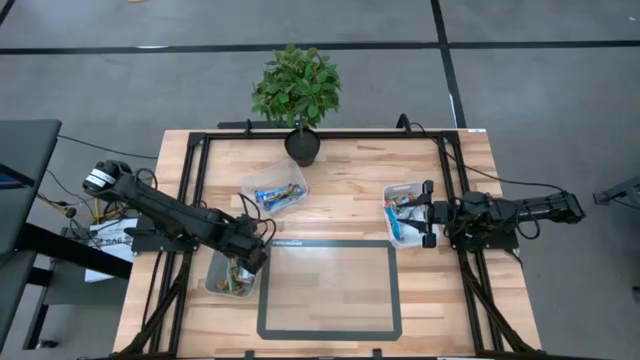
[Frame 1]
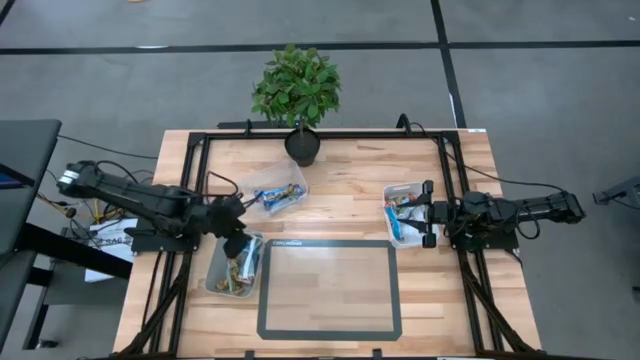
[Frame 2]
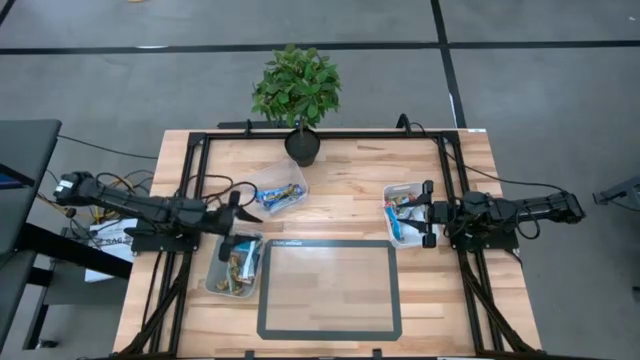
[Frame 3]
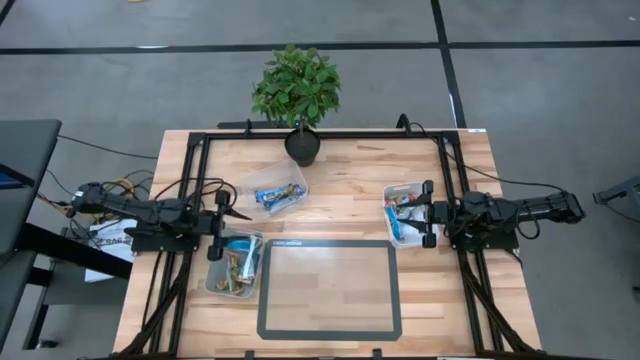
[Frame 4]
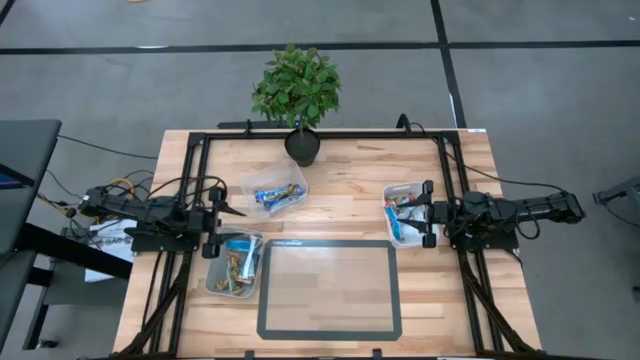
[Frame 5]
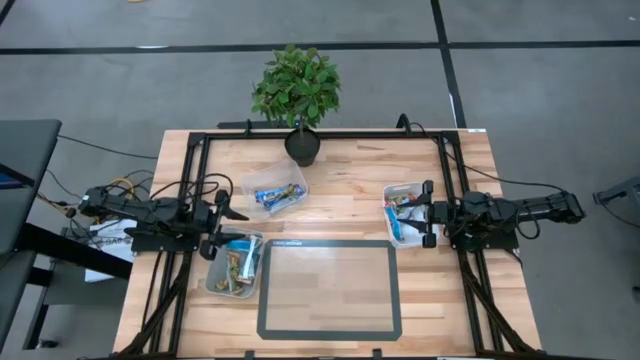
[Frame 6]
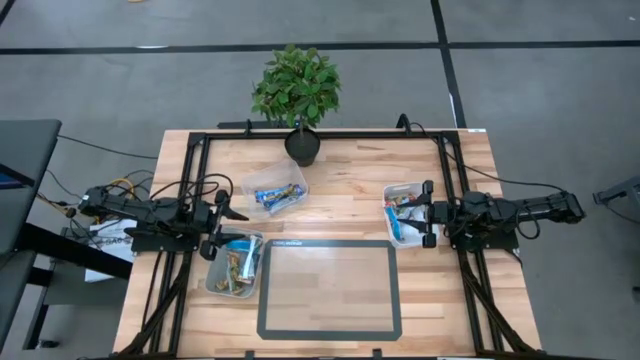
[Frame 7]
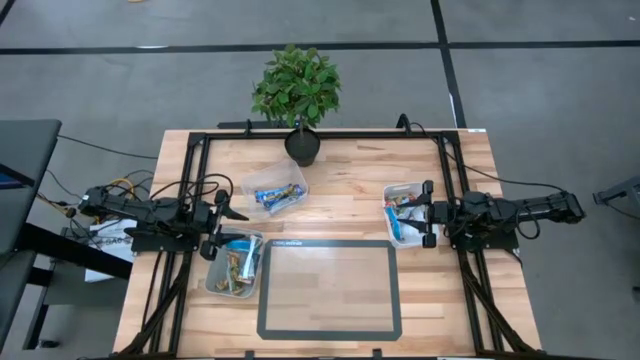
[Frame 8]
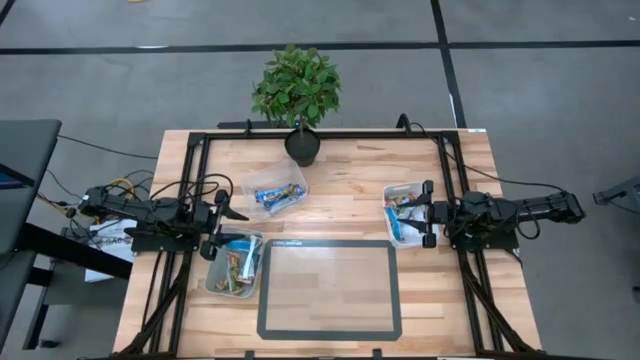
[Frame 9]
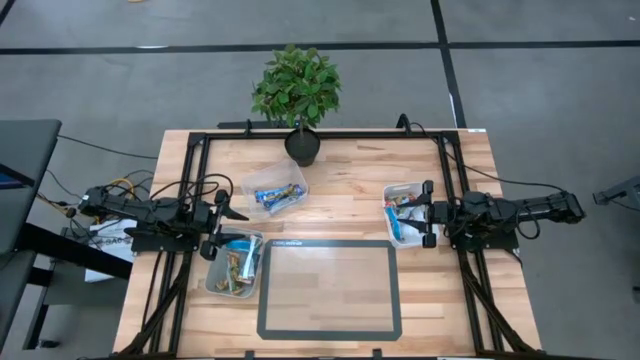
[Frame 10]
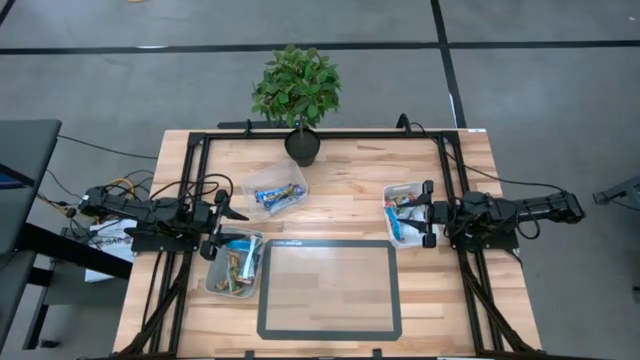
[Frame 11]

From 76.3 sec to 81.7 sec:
Task: Pick and place Granola Bars by type
Return to Home Position

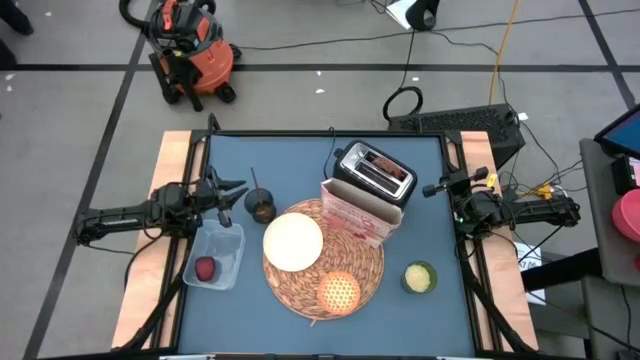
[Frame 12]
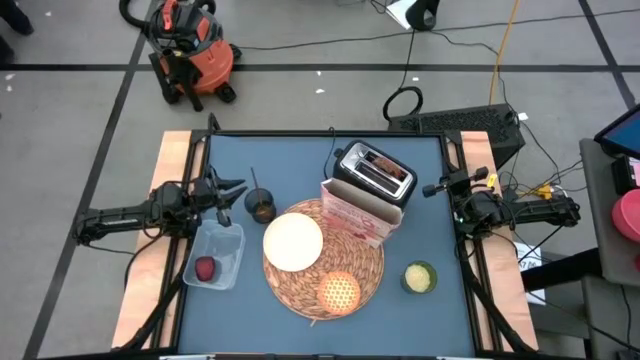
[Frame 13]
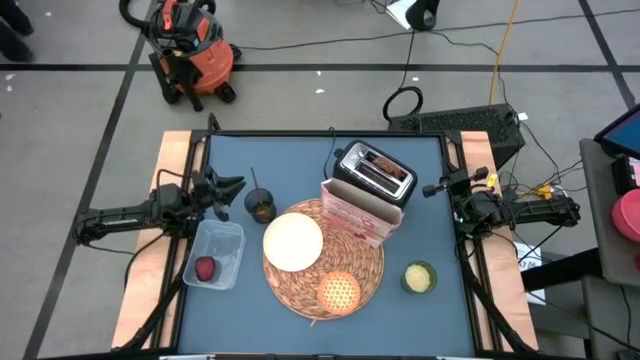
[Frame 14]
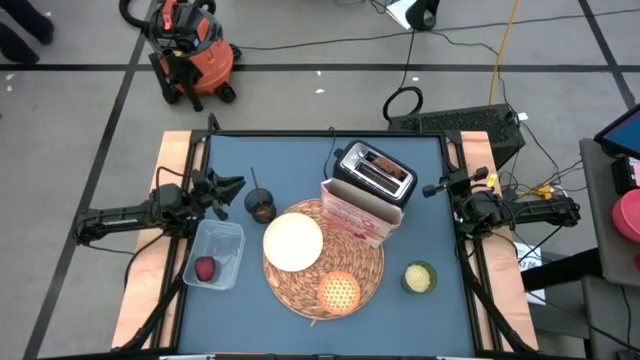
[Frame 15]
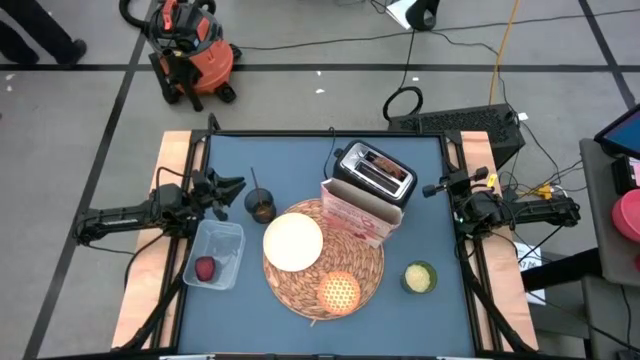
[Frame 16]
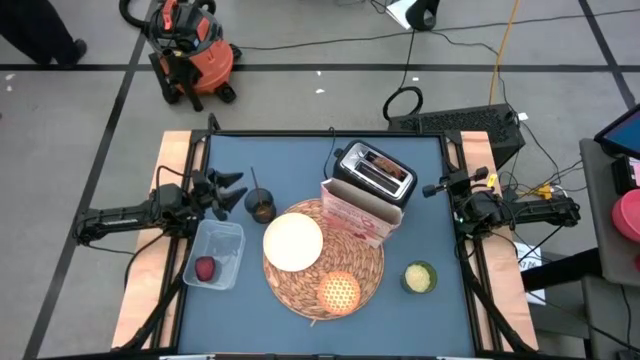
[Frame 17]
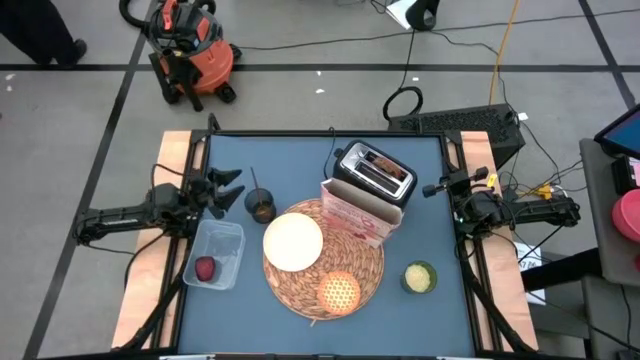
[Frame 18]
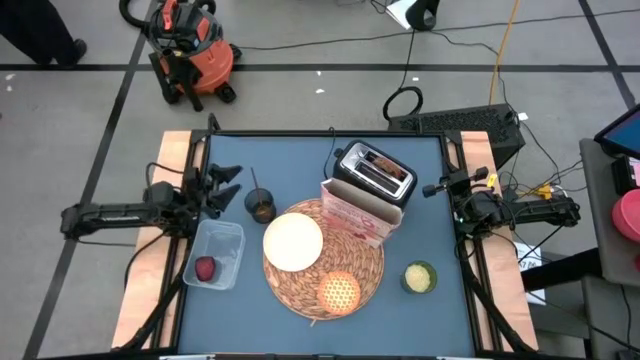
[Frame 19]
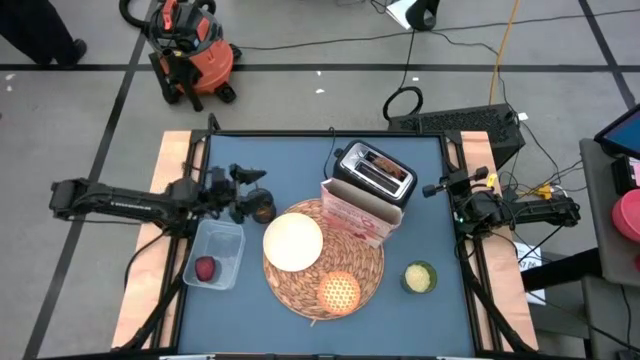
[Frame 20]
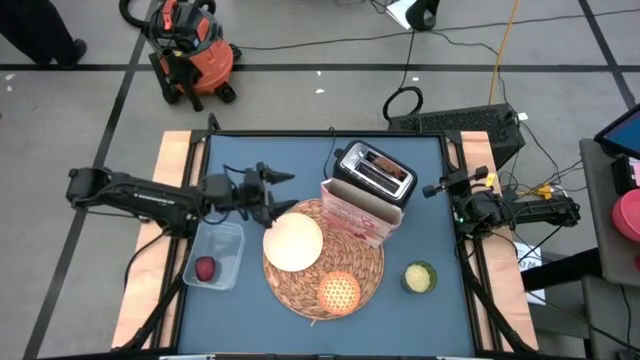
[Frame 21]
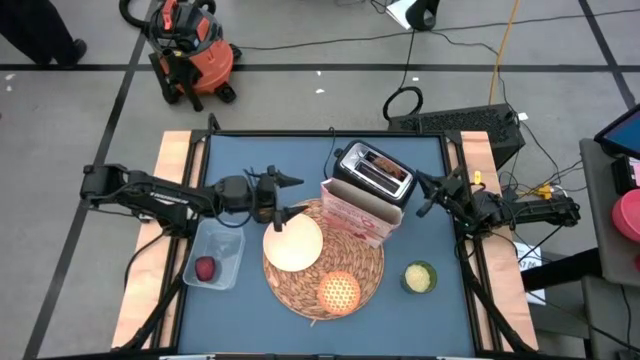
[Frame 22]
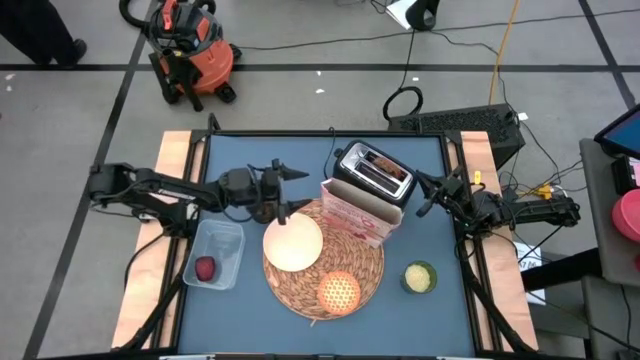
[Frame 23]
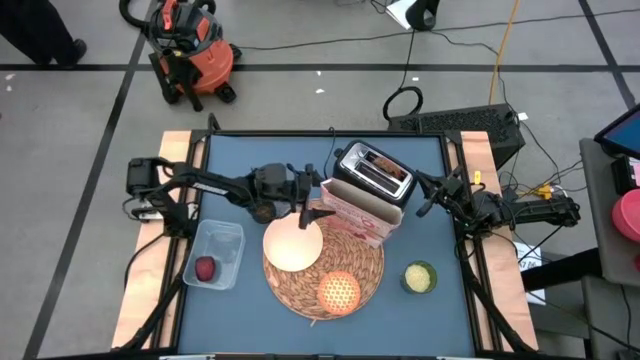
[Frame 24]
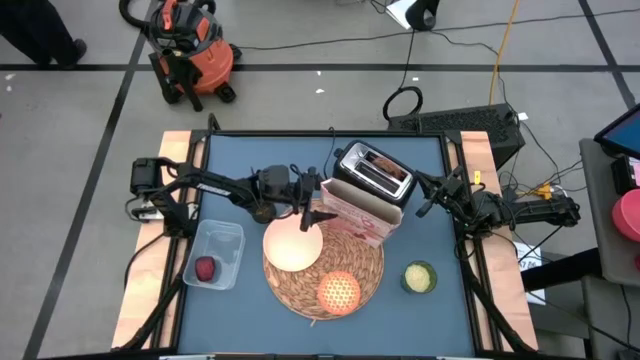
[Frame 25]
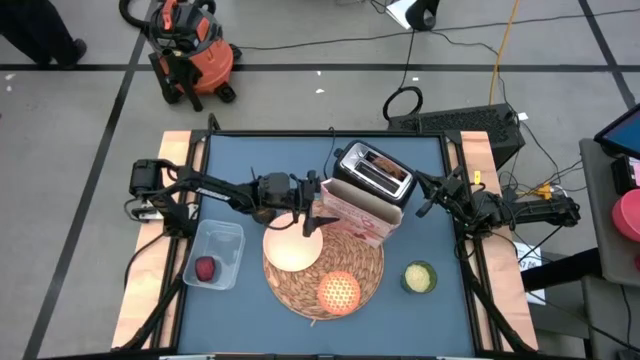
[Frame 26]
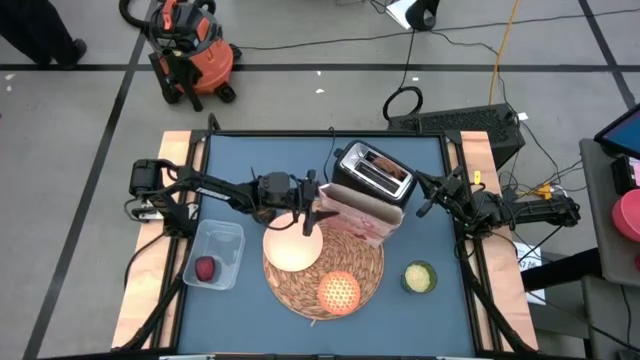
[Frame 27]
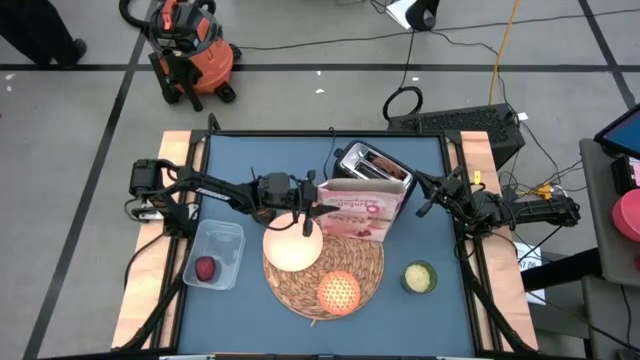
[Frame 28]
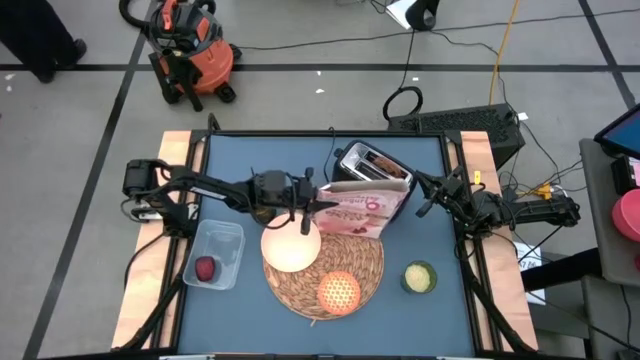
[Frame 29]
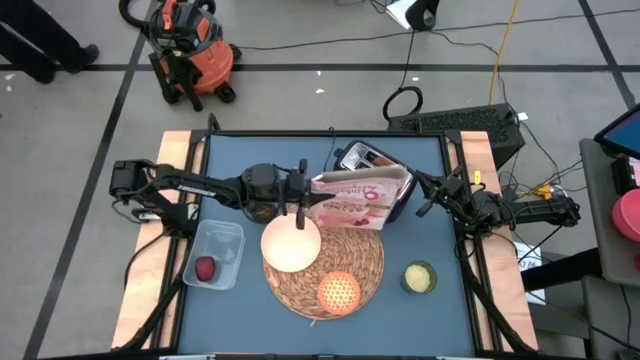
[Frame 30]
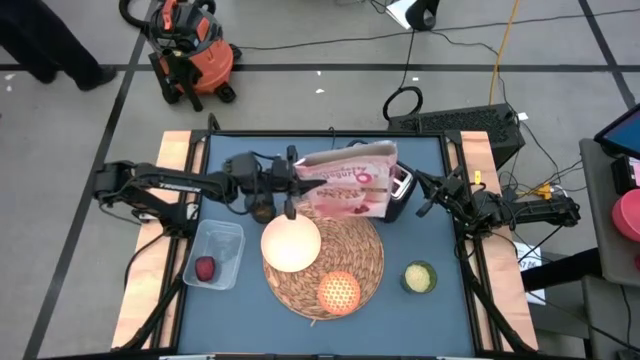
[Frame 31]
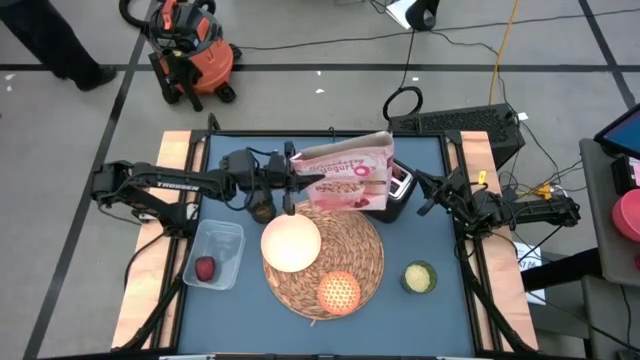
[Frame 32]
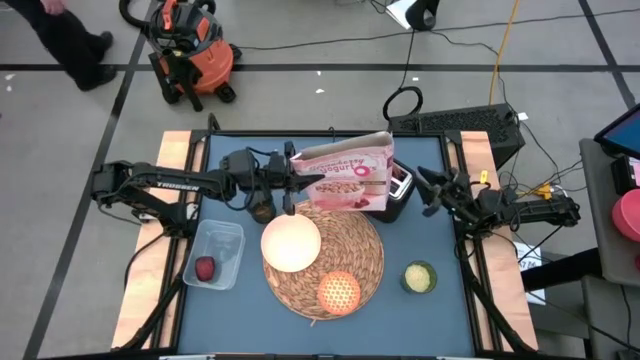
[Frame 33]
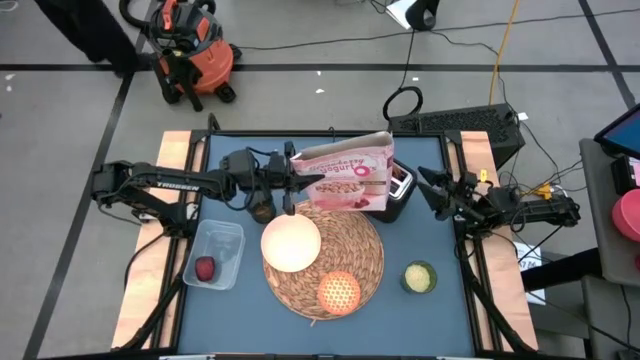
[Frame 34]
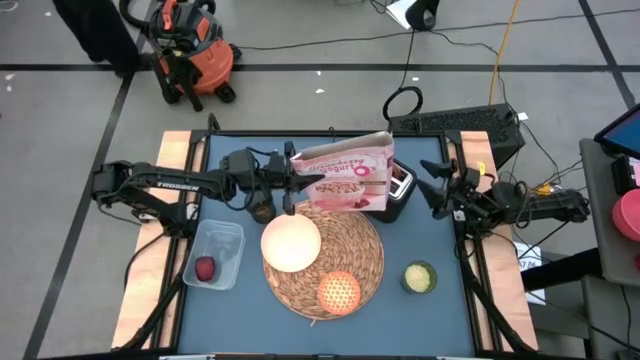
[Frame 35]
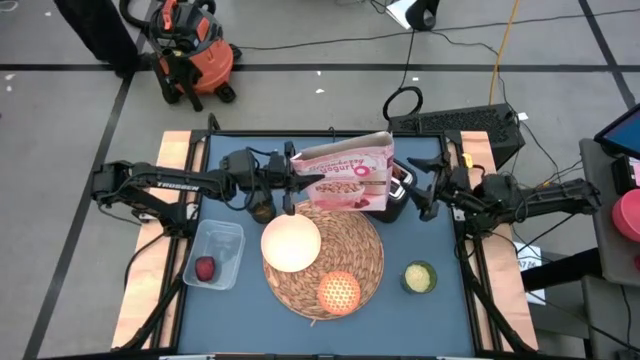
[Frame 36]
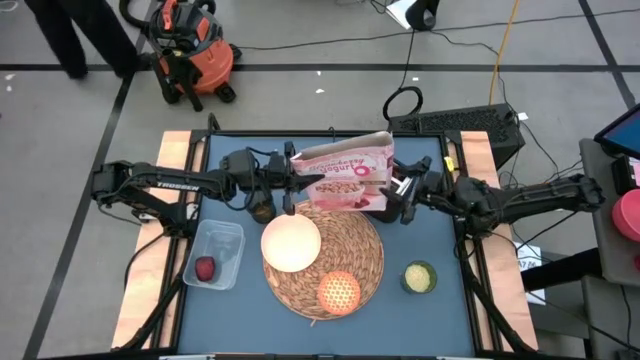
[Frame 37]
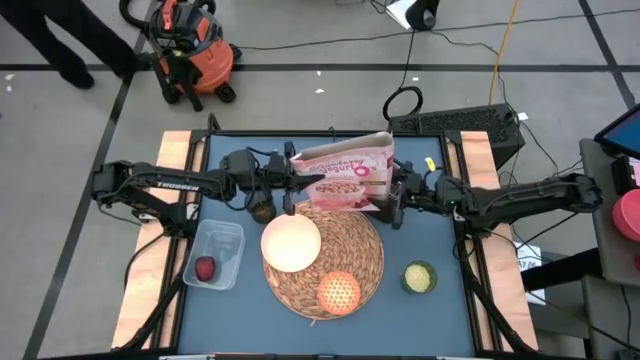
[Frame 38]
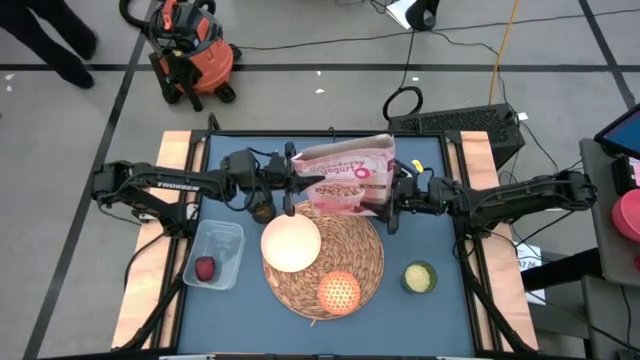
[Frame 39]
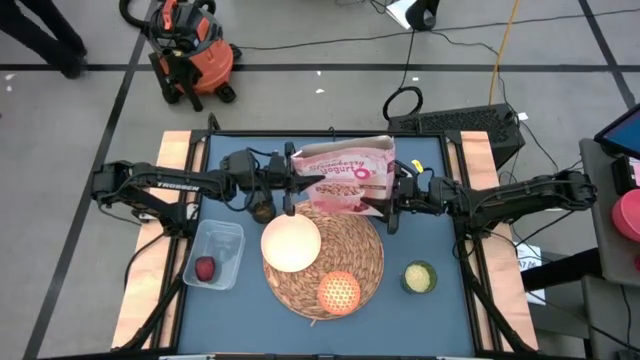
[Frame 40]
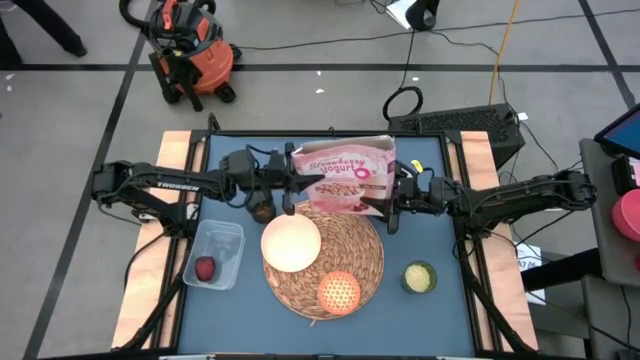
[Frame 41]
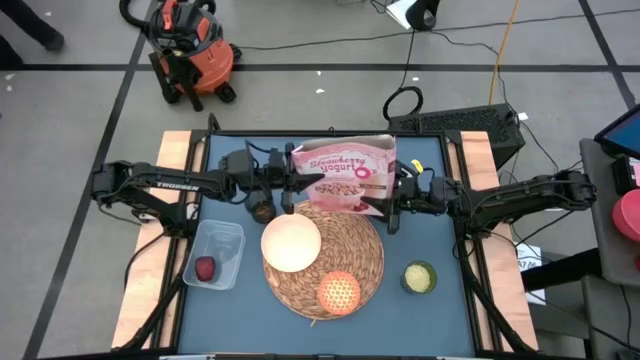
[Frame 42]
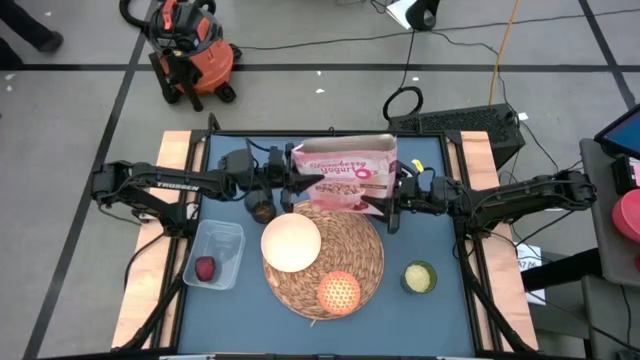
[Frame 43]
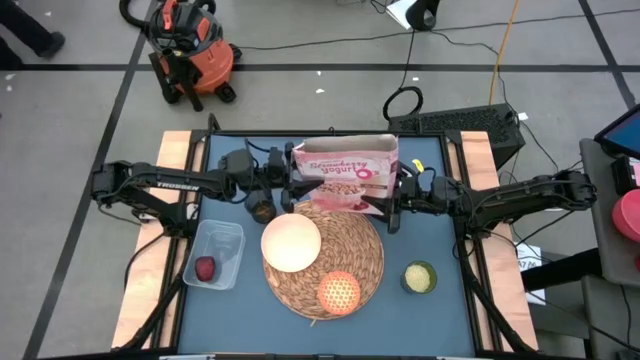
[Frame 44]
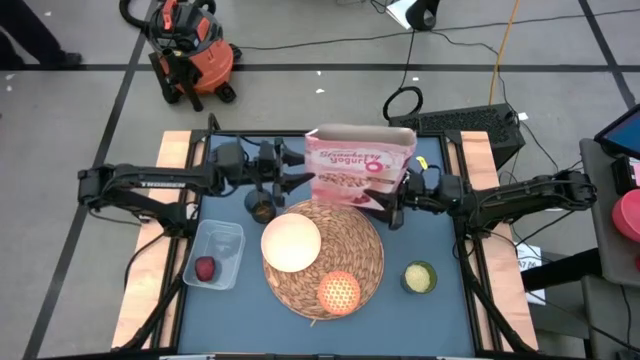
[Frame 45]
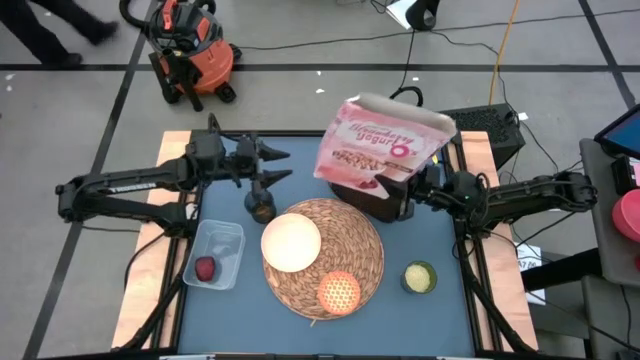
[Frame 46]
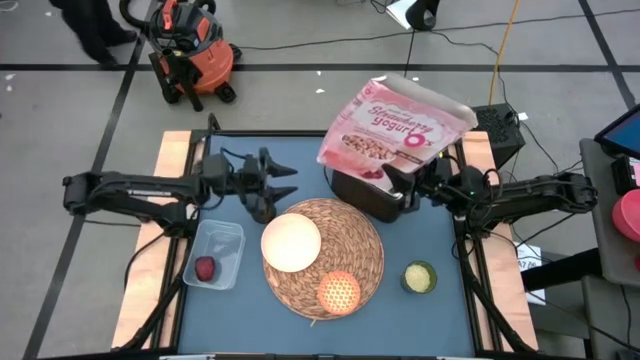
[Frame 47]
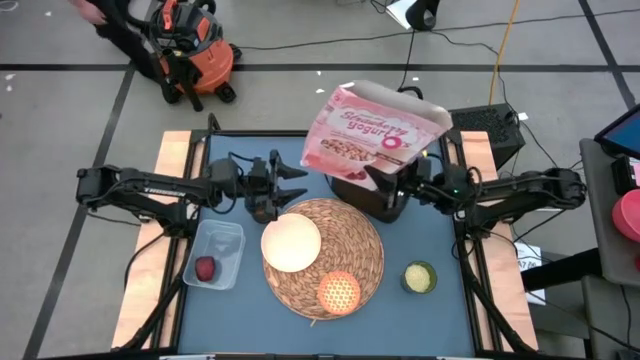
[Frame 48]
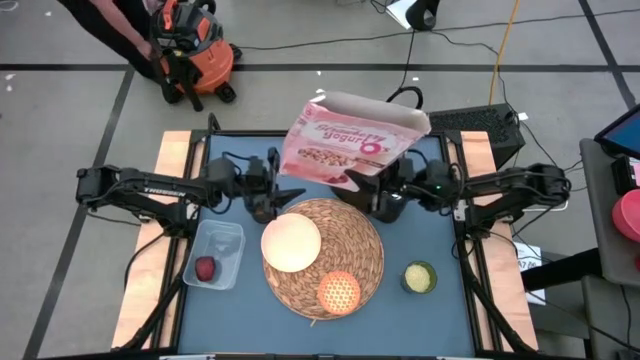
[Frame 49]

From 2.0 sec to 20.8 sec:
Task: Arrange a breakfast setting
Pour the cereal into the orange bowl
